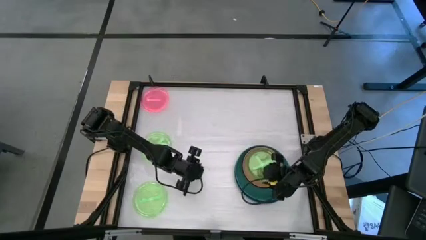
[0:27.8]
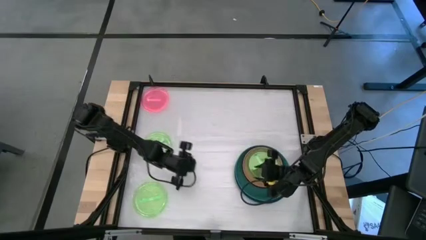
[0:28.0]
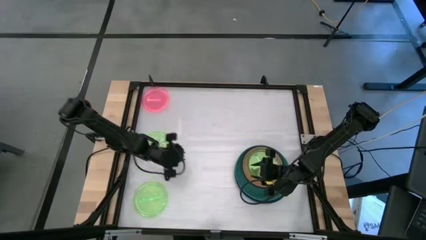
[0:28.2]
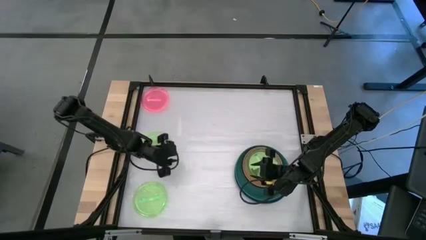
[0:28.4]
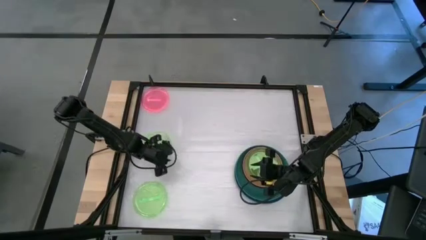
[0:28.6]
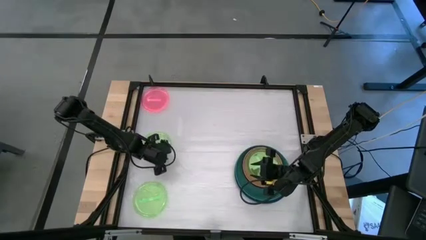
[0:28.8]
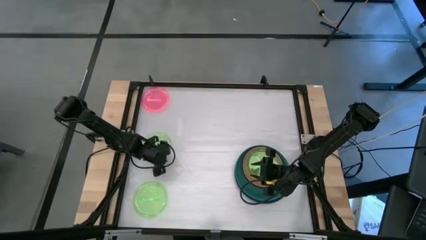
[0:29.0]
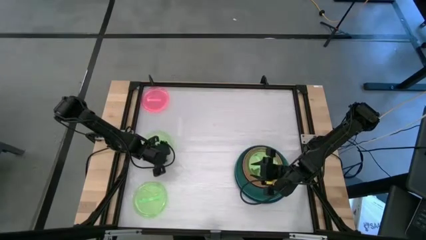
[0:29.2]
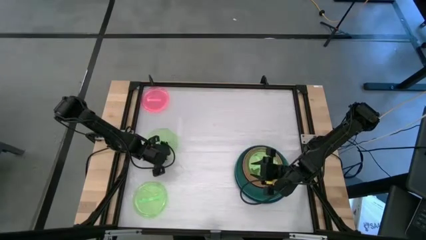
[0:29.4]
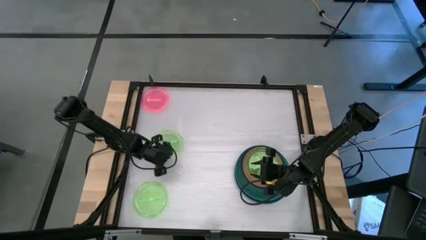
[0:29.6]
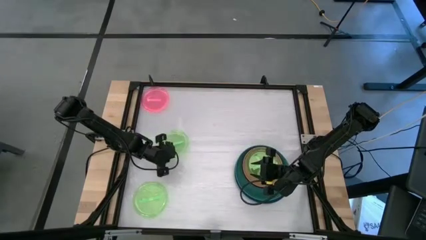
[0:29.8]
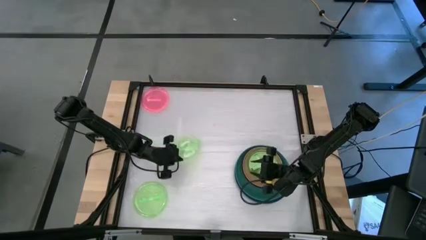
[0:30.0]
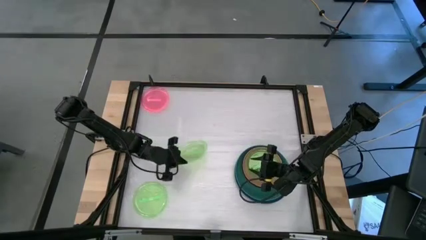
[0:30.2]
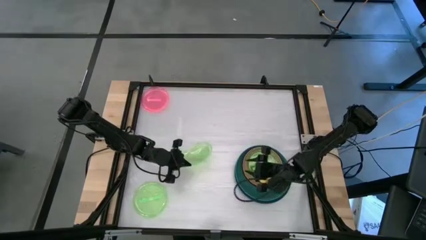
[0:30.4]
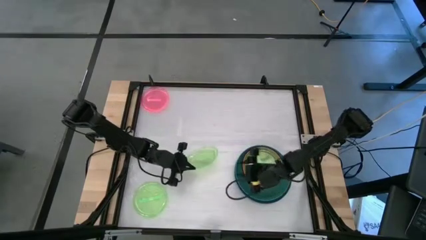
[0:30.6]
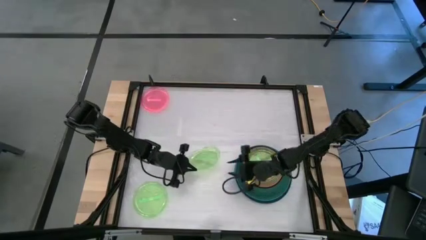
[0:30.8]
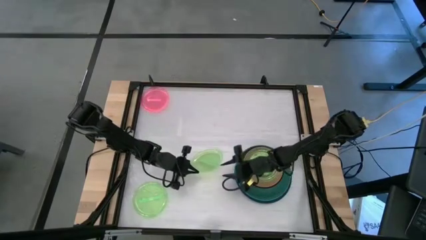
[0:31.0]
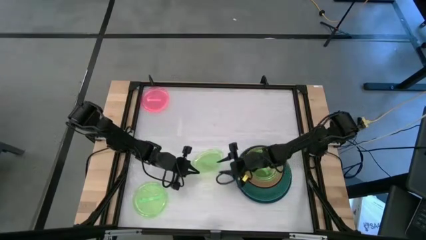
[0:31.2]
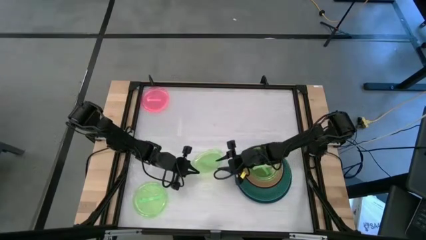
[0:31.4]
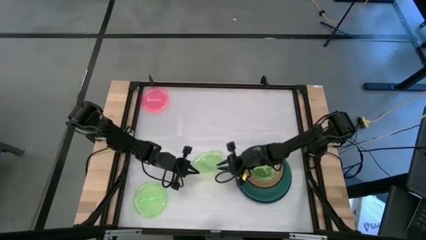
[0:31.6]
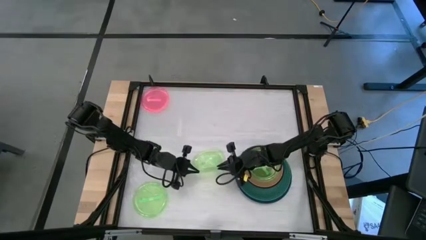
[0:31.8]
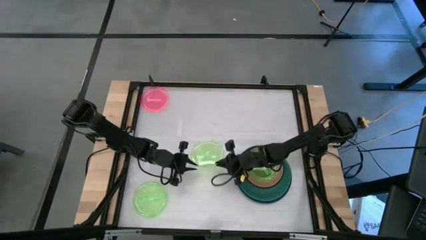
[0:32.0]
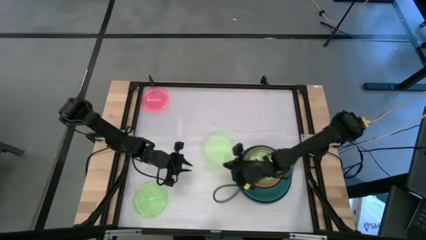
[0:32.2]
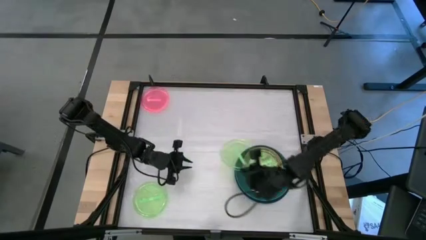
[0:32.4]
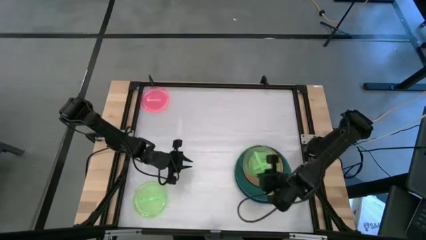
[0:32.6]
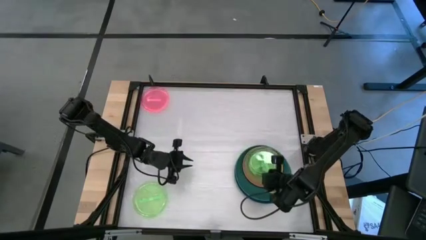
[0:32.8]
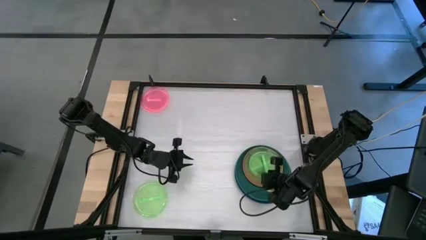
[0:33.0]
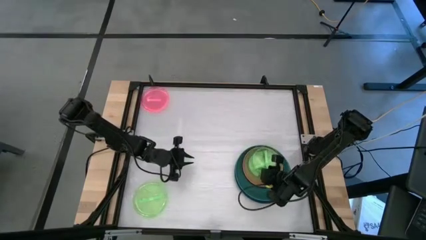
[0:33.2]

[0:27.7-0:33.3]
Task: Stack plastic plates
Stack the light green plate on top of the light green plate

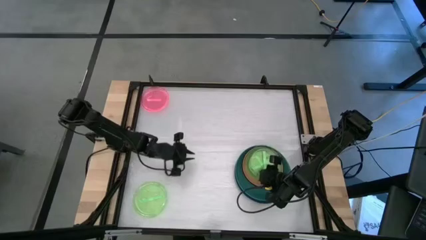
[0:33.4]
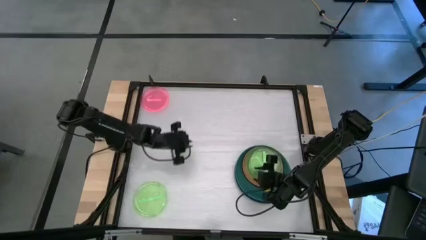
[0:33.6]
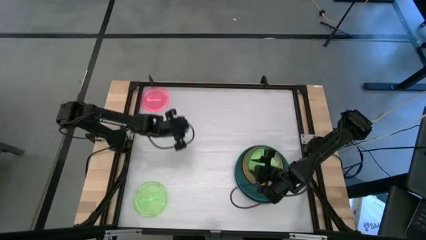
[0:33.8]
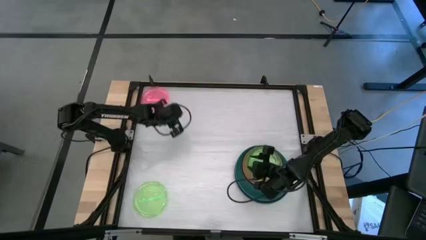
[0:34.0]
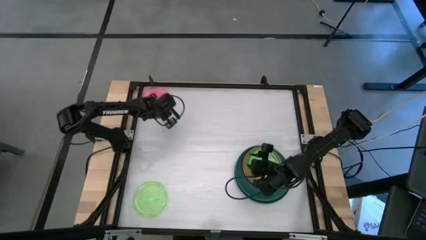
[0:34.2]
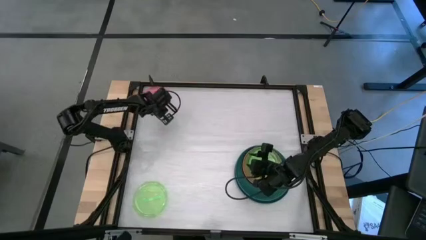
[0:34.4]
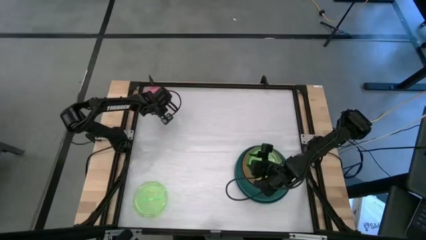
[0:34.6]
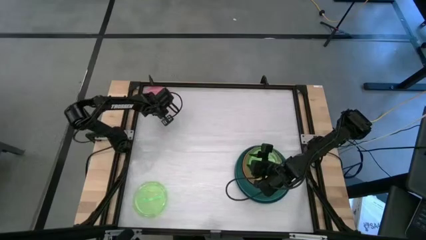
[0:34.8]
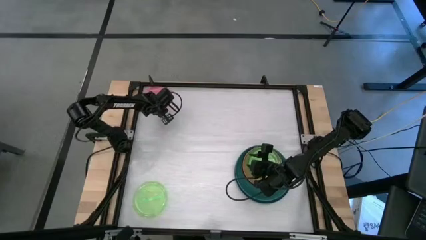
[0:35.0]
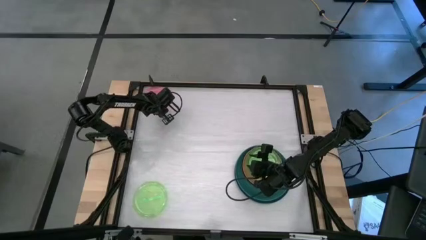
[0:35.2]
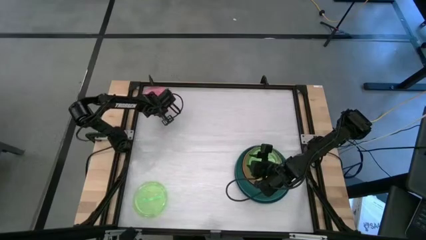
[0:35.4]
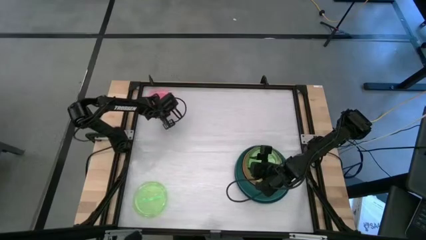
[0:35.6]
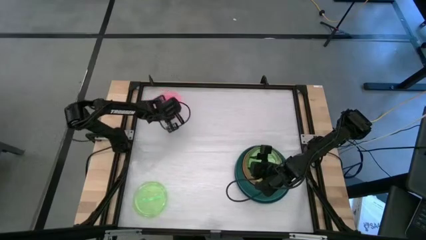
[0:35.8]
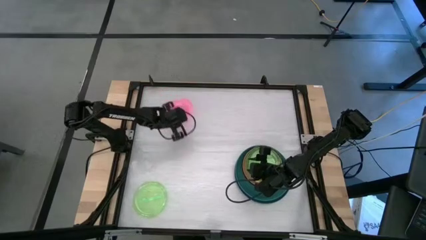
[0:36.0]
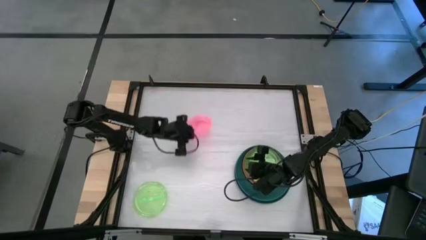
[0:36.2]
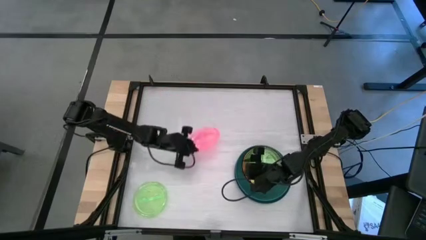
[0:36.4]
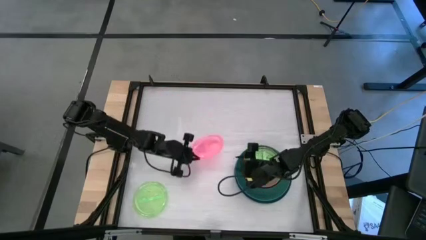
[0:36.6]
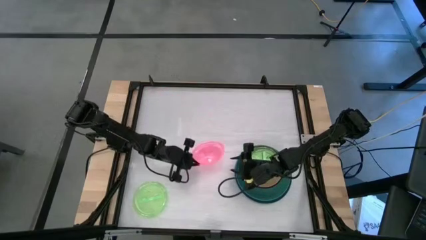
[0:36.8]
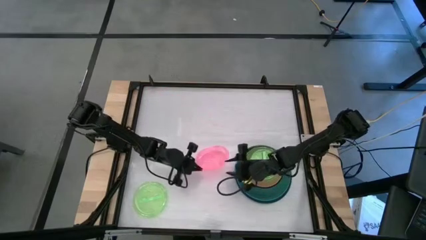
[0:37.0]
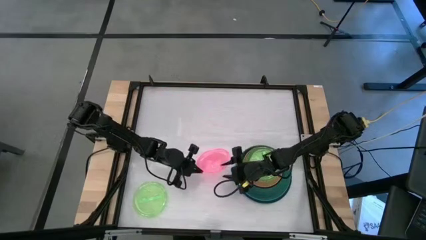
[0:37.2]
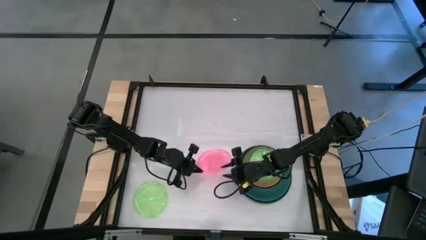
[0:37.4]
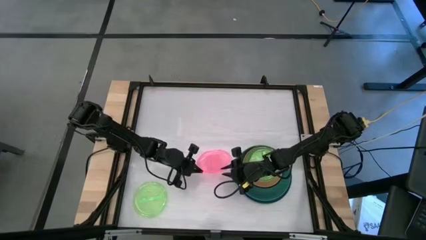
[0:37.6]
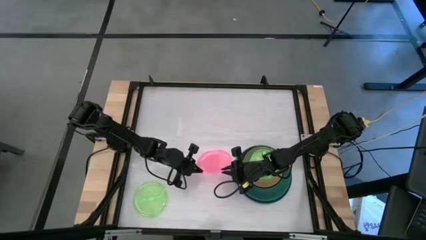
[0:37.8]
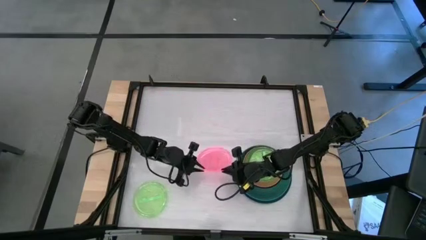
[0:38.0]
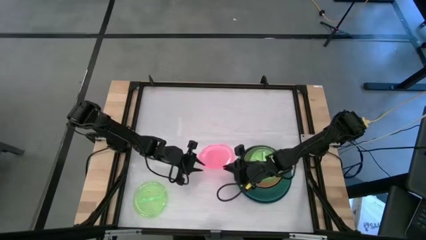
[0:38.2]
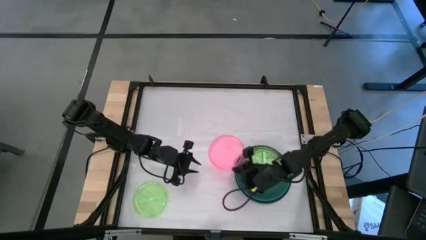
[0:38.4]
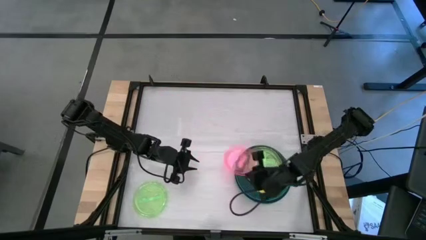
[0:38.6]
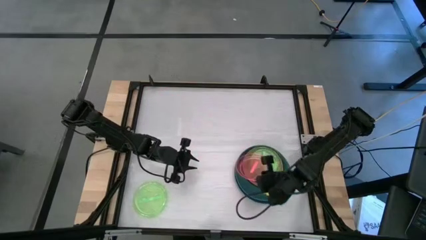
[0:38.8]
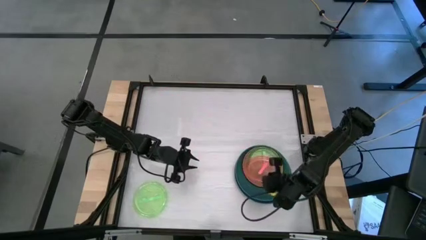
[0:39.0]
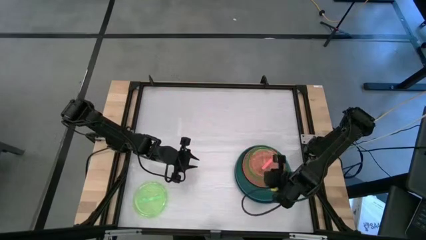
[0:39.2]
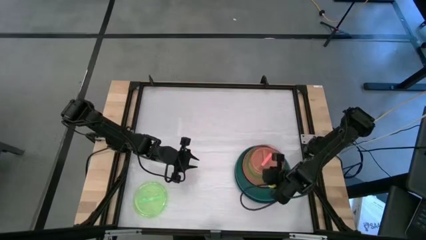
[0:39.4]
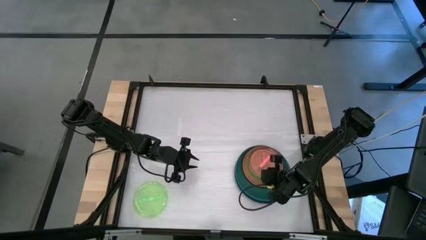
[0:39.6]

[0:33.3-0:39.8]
Stack the light pink plate on top of the light green plate

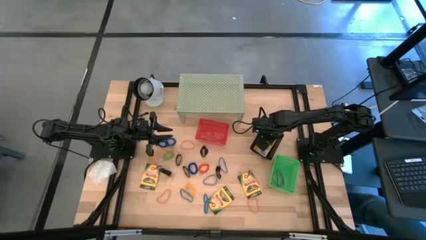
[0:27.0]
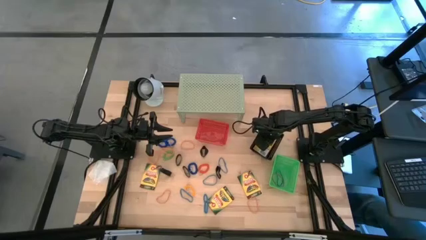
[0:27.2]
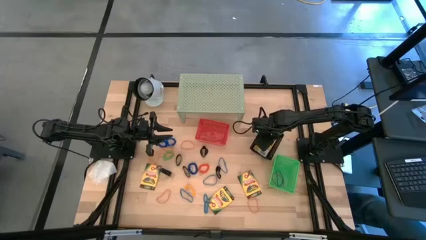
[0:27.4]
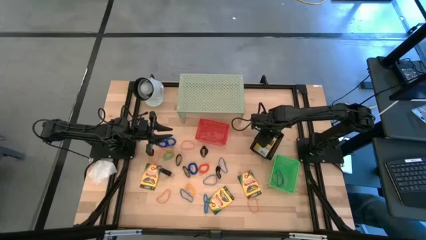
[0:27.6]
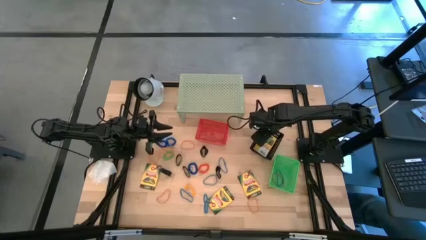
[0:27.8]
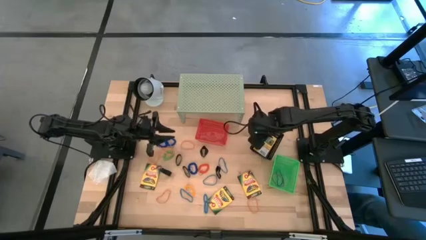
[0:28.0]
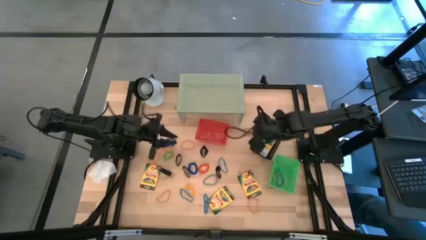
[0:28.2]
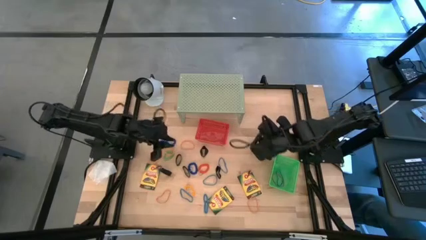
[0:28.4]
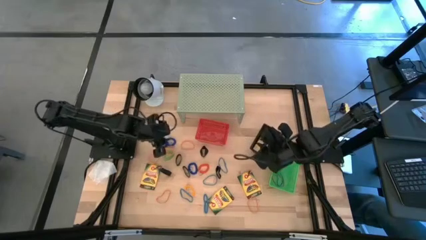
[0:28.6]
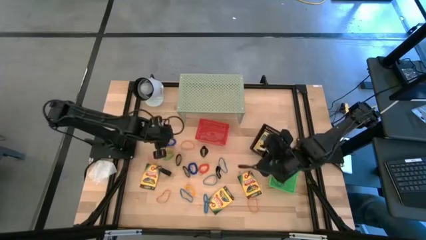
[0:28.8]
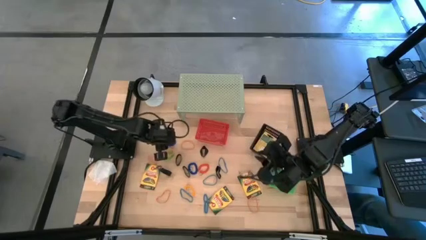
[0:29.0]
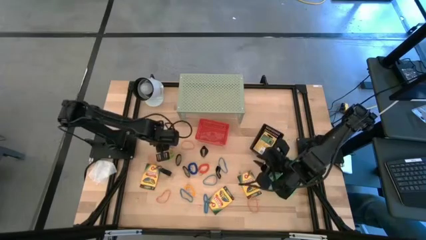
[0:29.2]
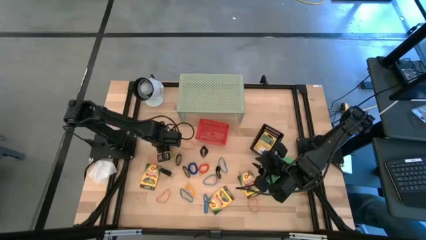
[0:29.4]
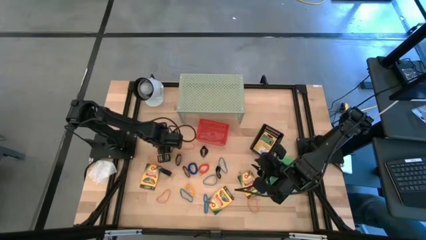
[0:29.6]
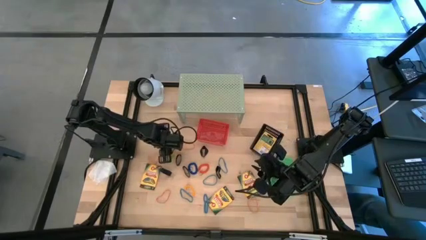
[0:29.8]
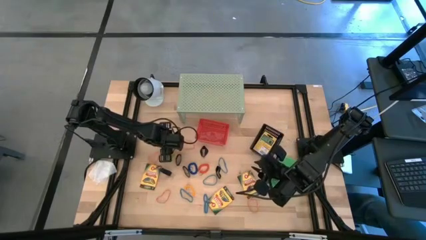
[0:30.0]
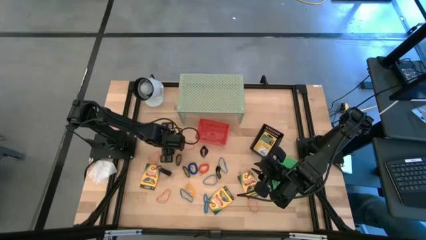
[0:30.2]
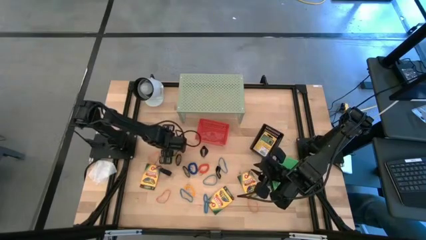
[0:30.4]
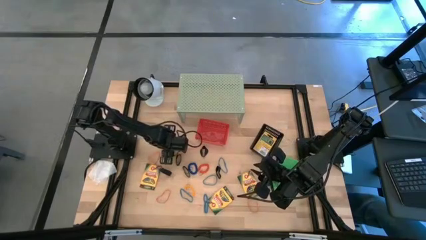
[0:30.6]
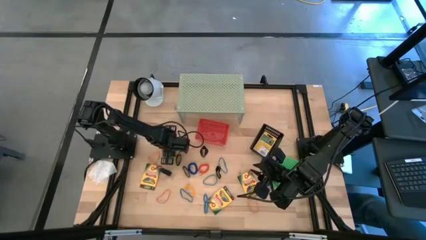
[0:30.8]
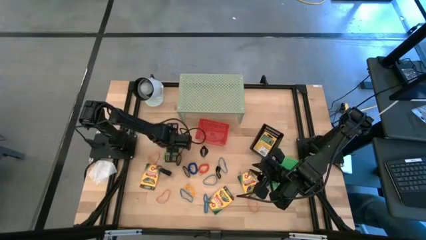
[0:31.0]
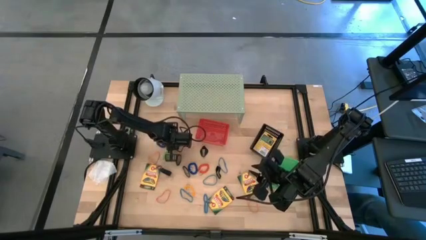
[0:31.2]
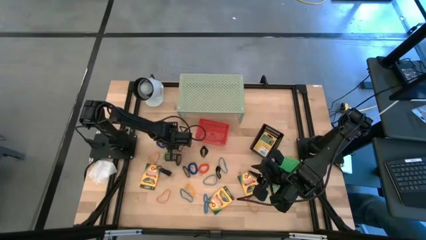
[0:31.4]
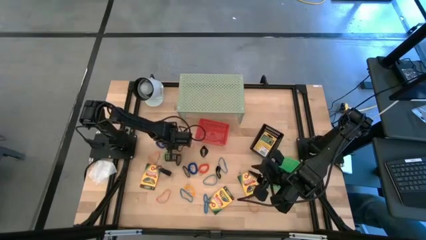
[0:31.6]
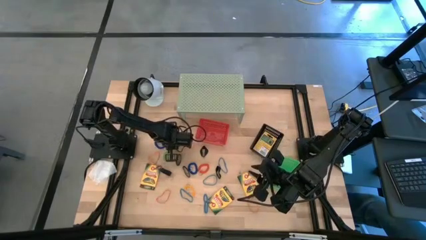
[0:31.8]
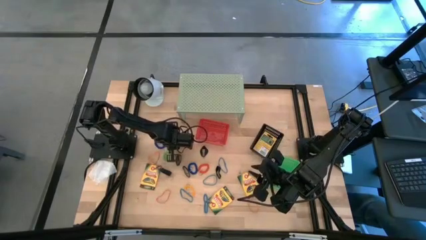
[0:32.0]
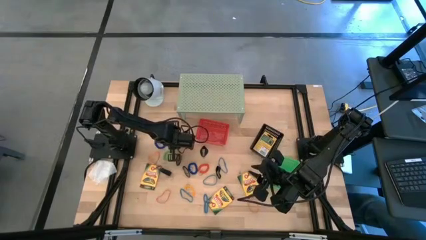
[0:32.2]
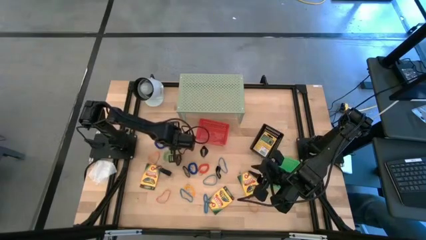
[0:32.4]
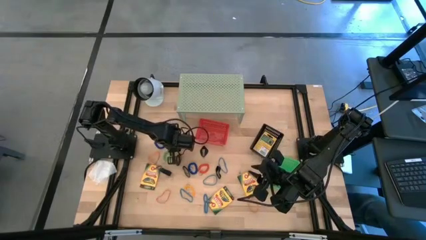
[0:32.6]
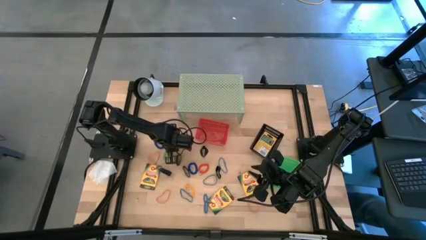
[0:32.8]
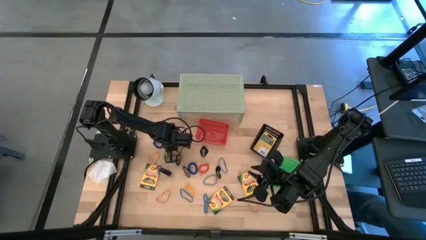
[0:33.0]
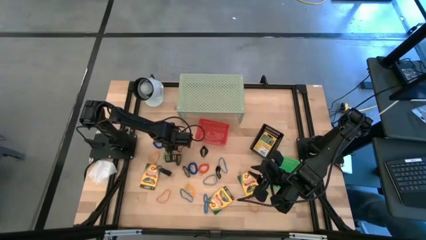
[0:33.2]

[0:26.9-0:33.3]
Task: Pick & Place Office Desk Supplies
Put the blue spring keychain into the red bin
